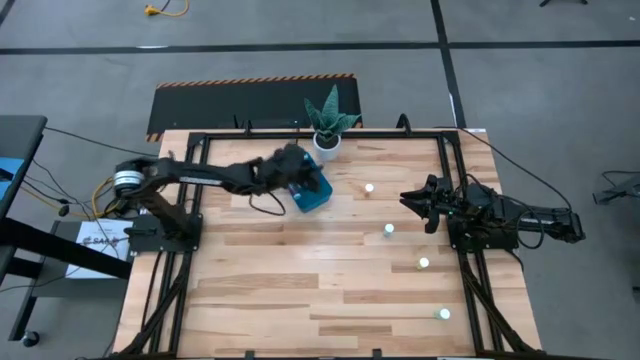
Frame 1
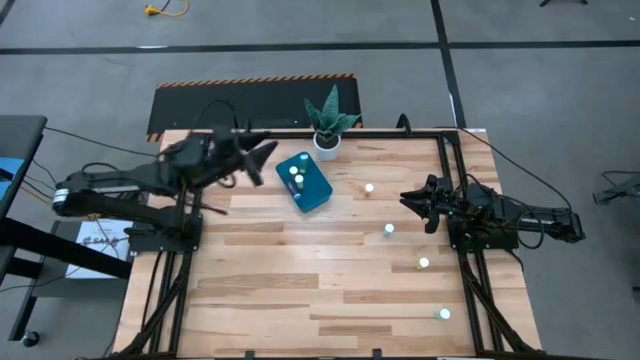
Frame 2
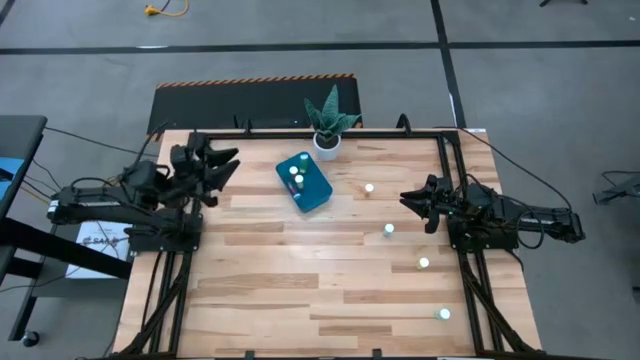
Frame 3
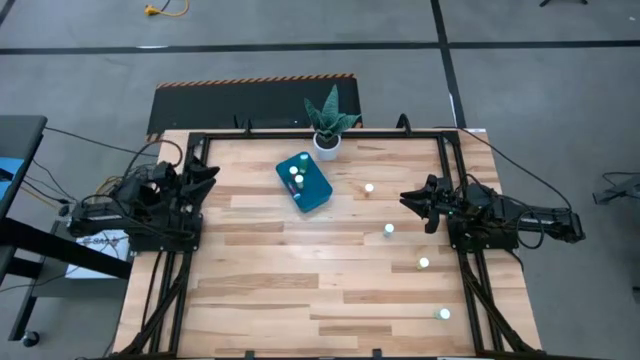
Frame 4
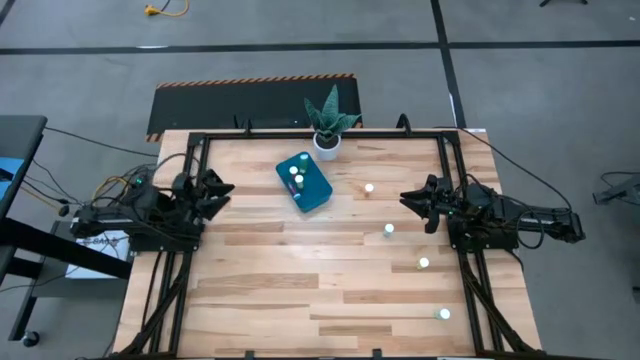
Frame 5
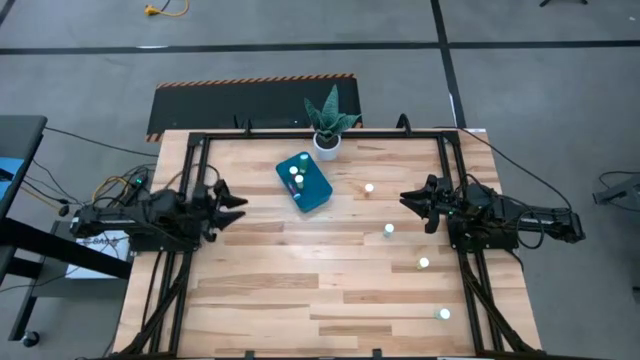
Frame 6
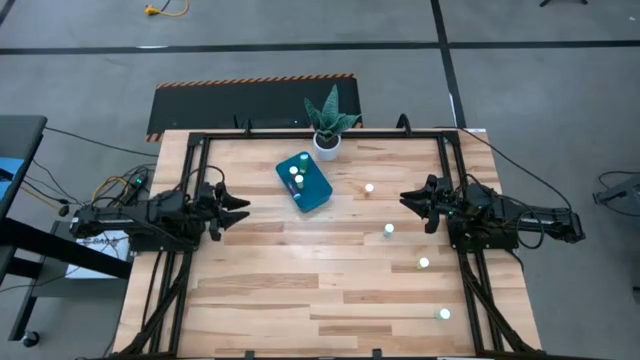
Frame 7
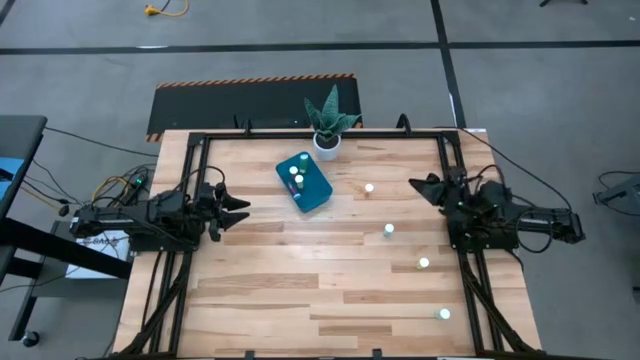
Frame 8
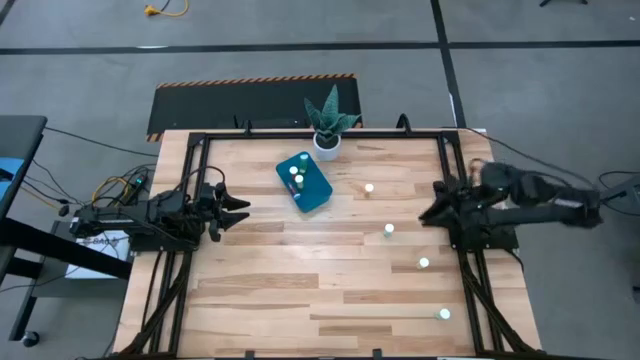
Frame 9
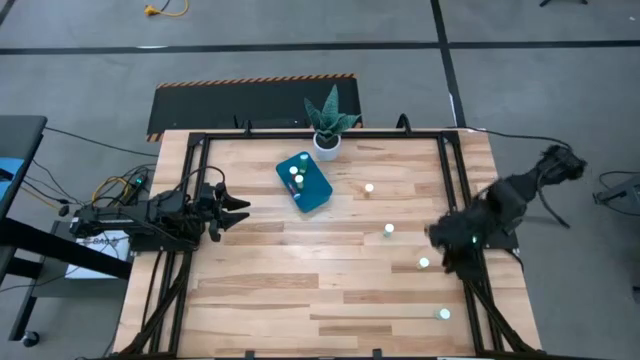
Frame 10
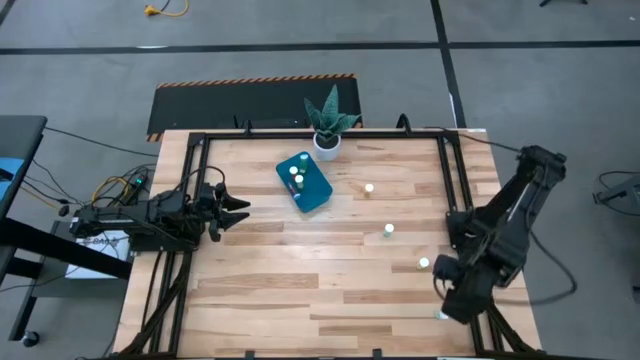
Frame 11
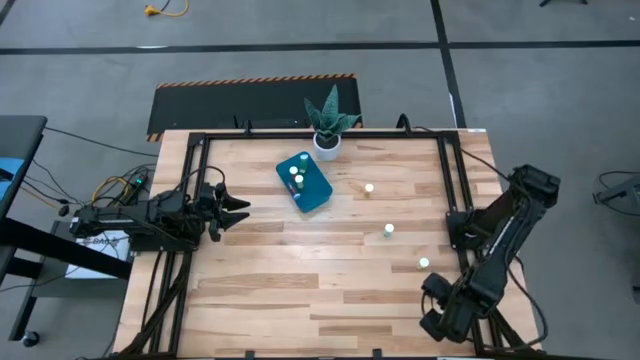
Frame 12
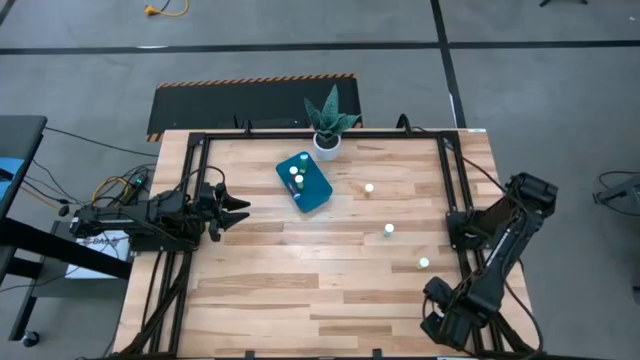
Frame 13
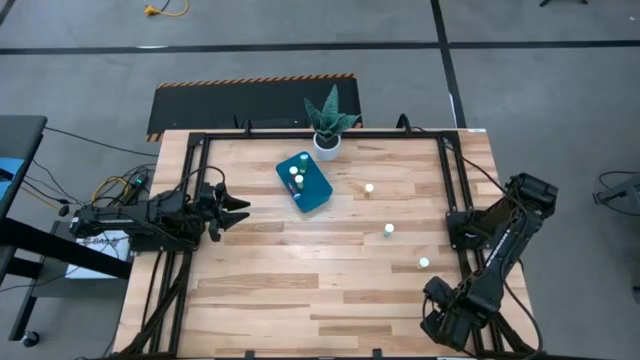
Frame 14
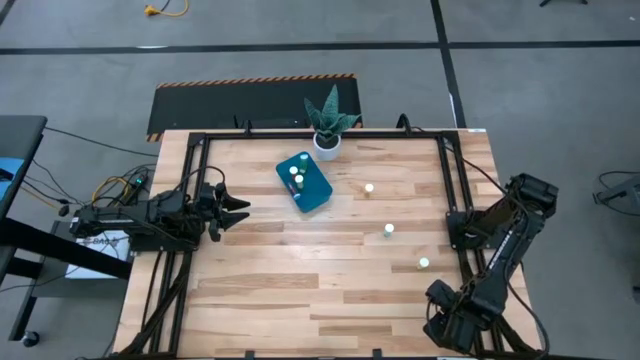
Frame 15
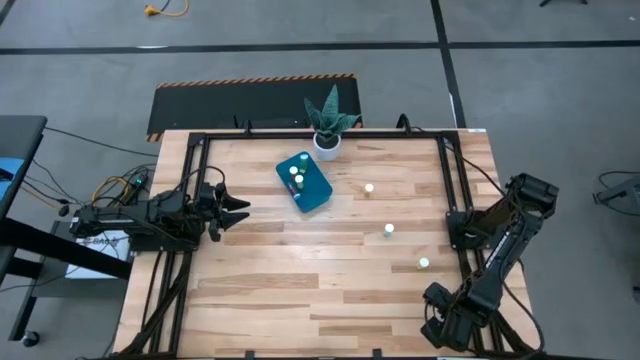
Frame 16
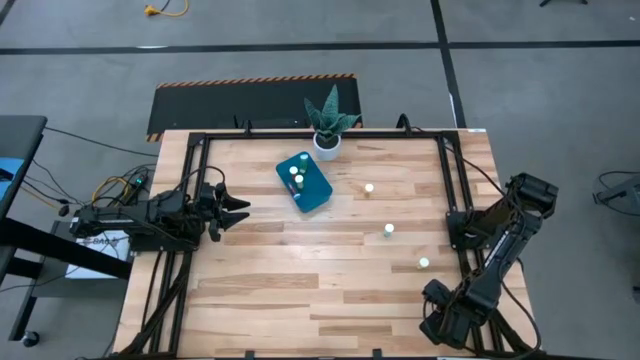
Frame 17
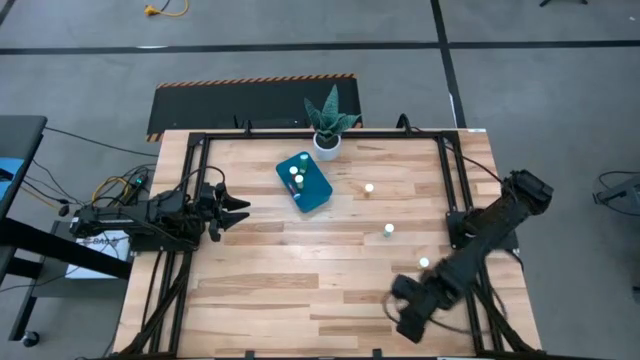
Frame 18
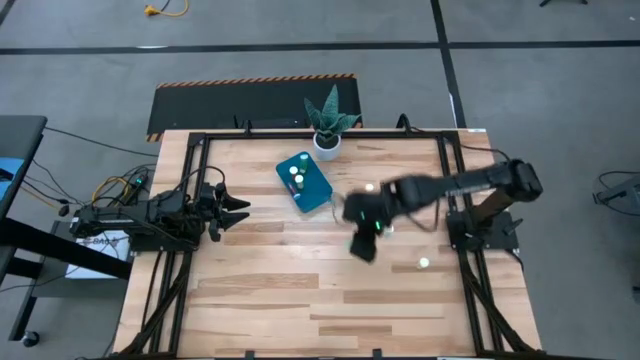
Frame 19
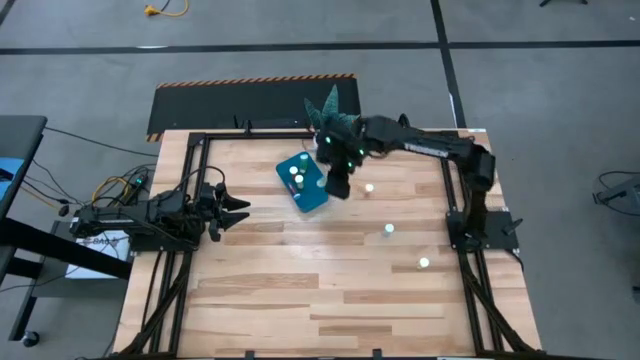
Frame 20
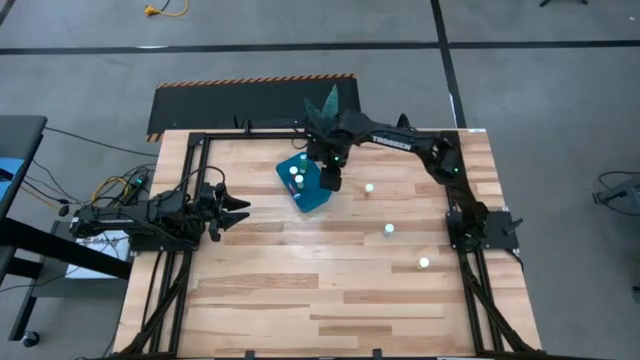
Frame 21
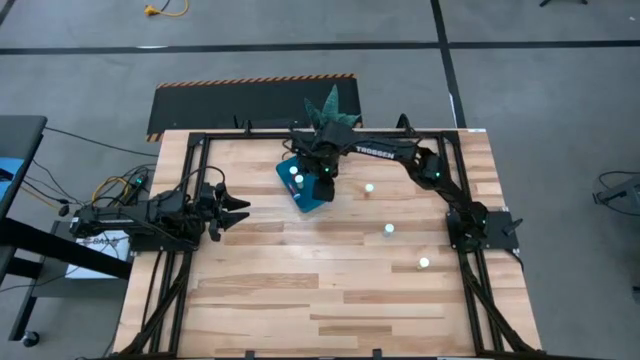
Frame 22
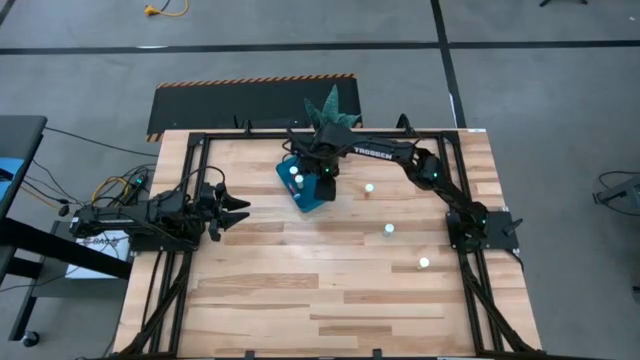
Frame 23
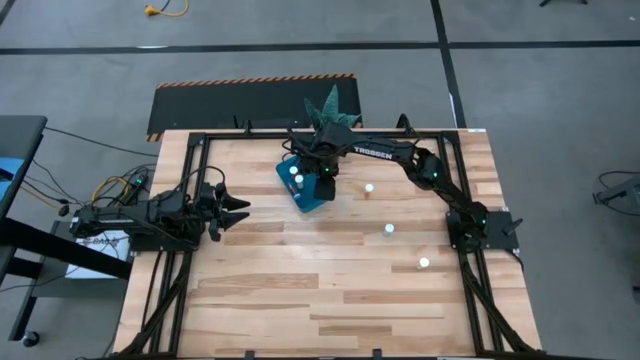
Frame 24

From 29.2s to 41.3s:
Task: Pick and place pill bottles into a basket
Put the bottom blue pill bottle into the blue bin

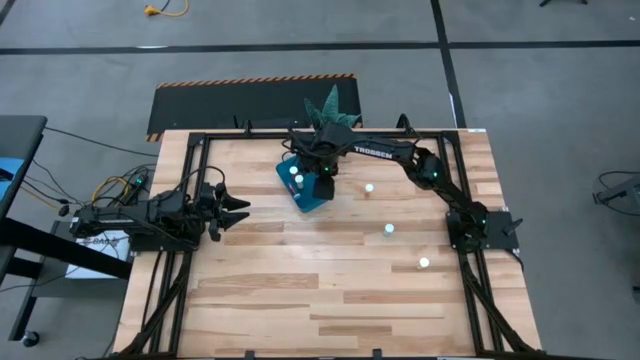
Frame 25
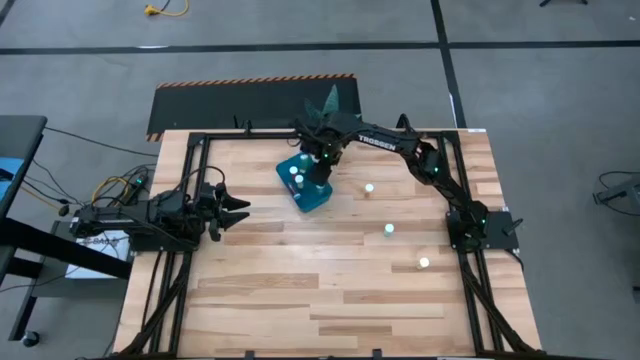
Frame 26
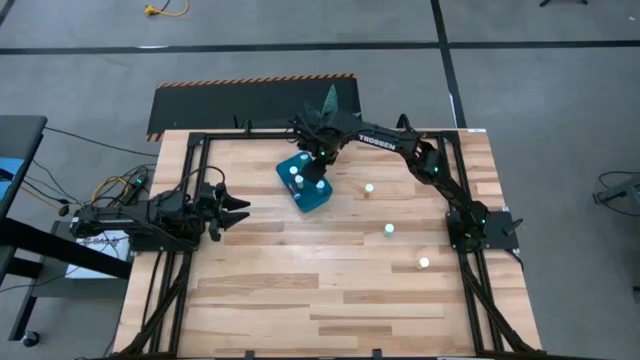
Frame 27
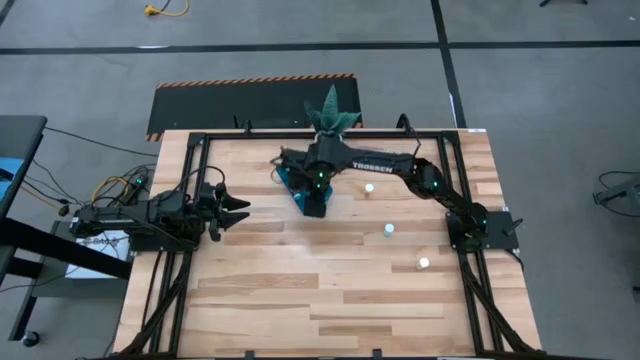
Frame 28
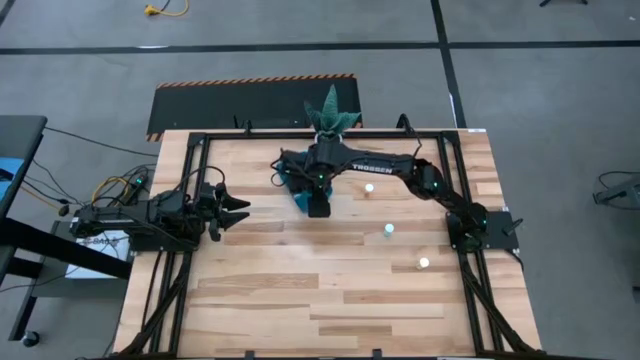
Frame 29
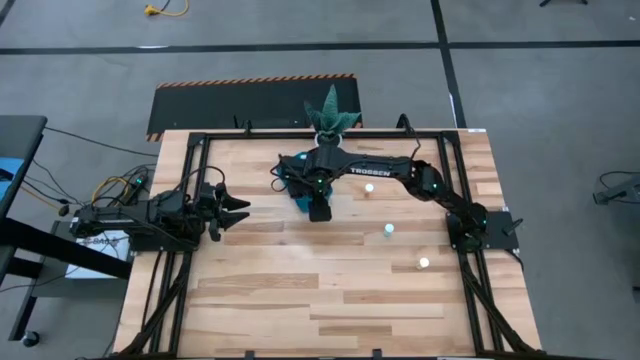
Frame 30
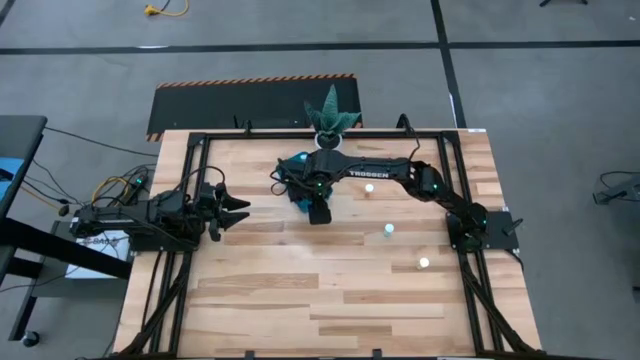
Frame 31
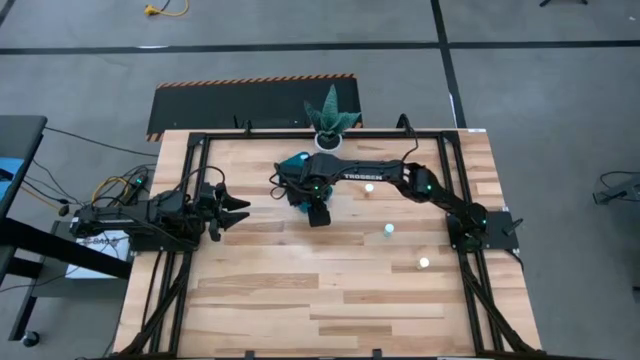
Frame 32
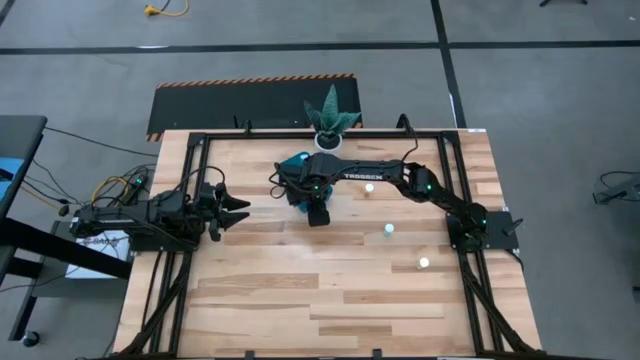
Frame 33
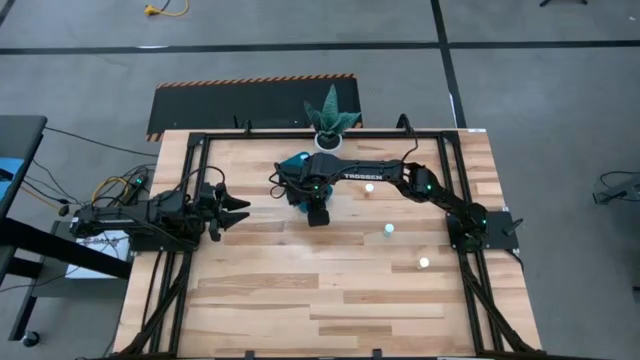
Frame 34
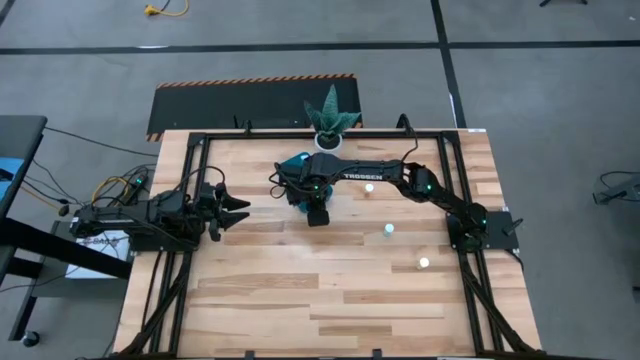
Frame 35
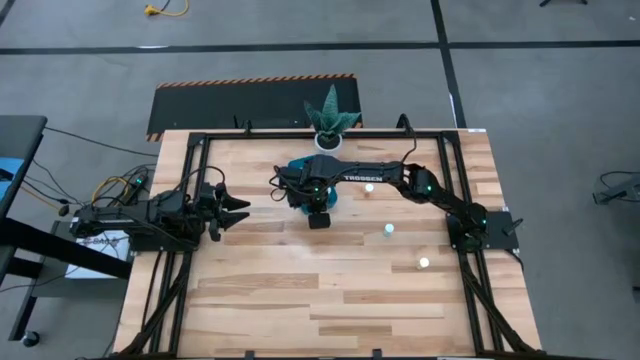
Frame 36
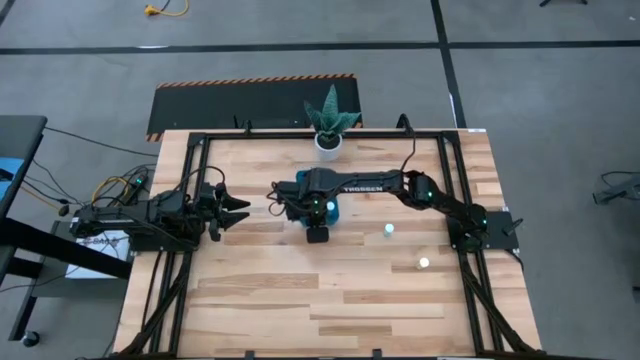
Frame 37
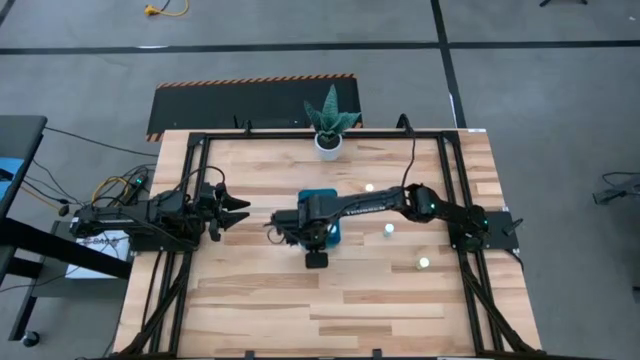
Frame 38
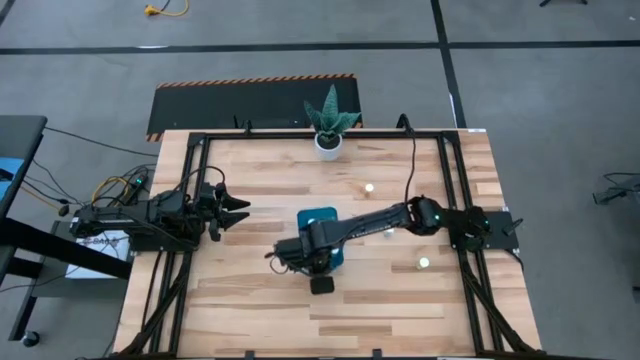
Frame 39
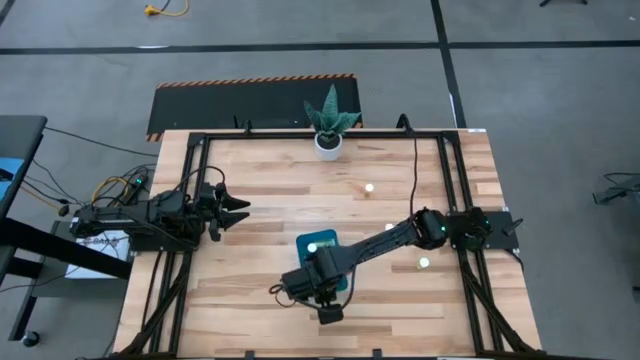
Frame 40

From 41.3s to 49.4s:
Move the blue bin to the center of the table

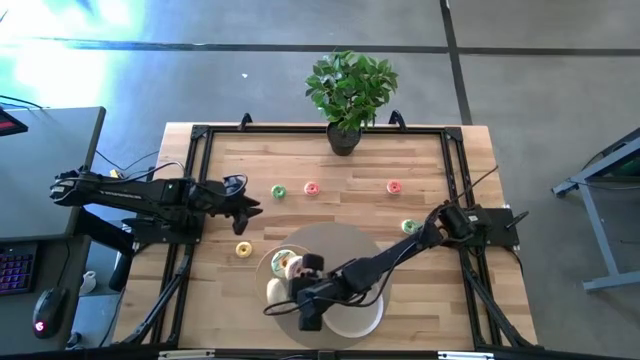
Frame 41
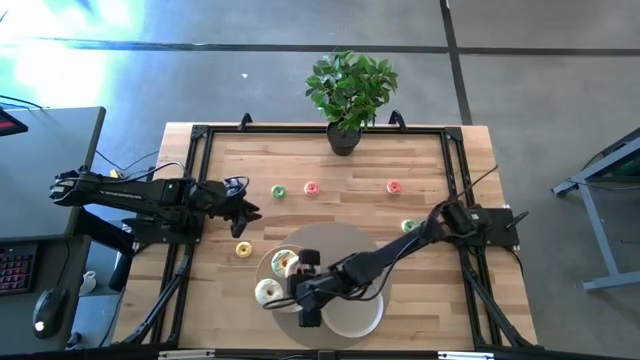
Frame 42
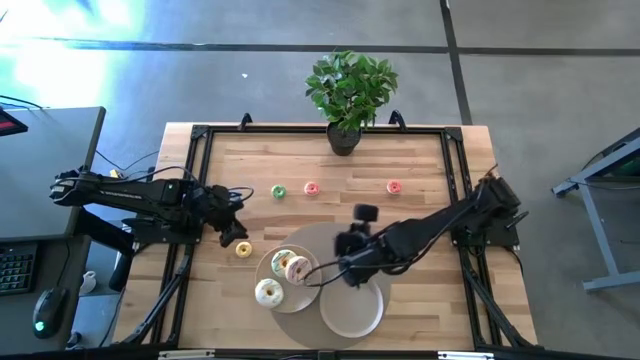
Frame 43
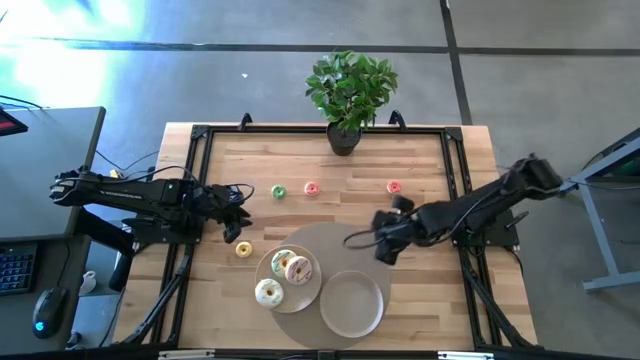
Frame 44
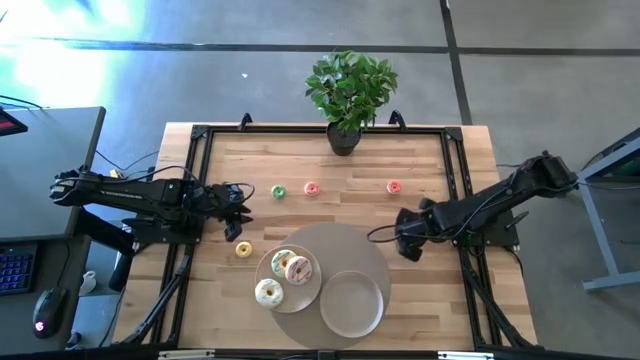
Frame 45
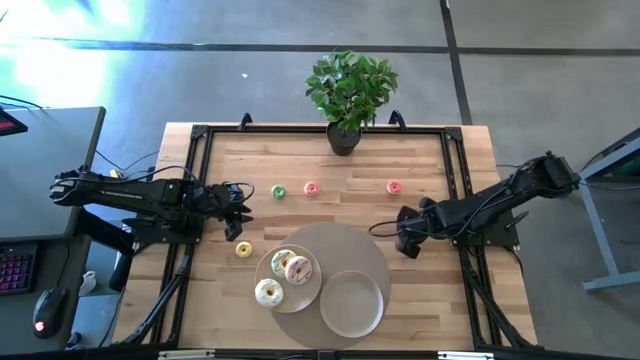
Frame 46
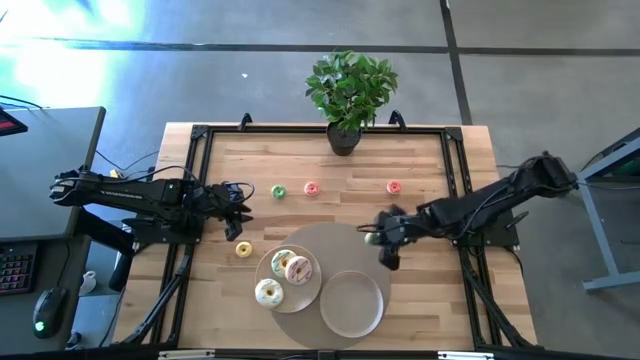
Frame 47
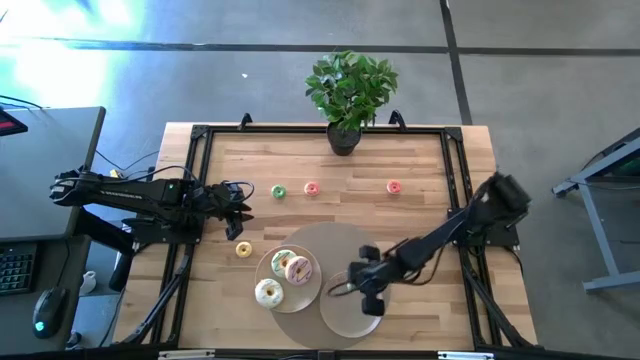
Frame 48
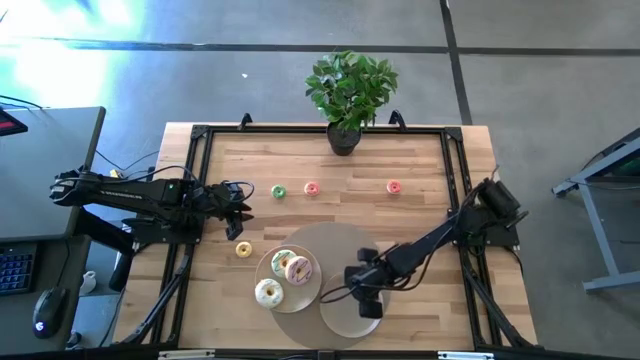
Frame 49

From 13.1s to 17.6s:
Task: Pick & Place donuts
Put the small green donut on the right white plate
